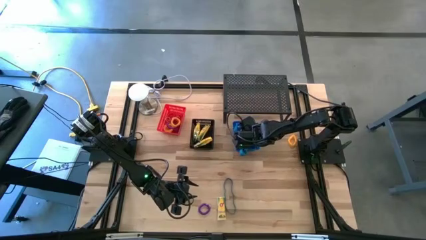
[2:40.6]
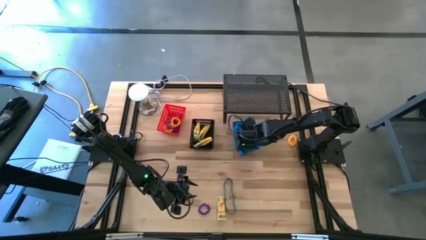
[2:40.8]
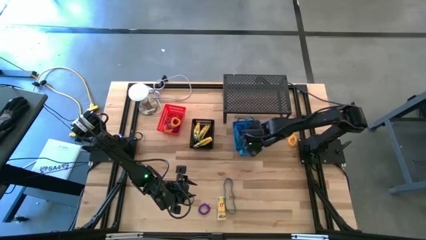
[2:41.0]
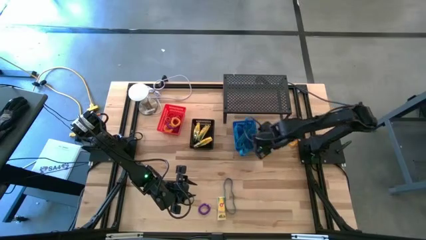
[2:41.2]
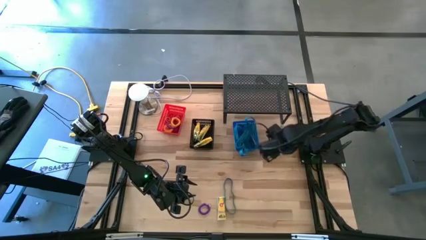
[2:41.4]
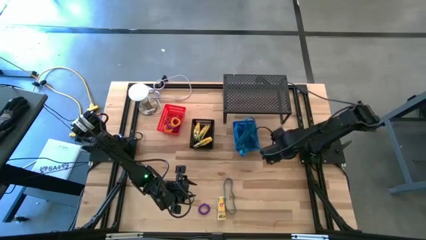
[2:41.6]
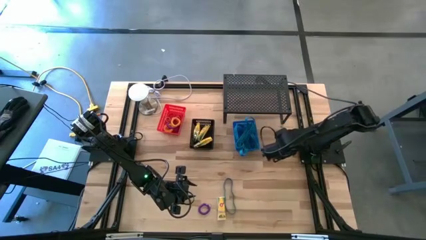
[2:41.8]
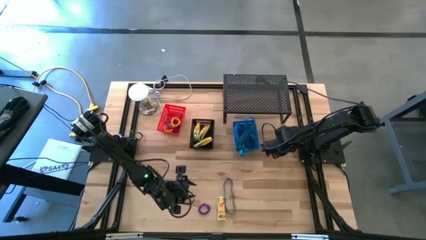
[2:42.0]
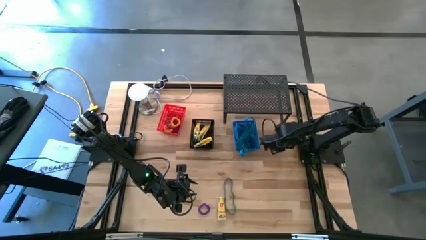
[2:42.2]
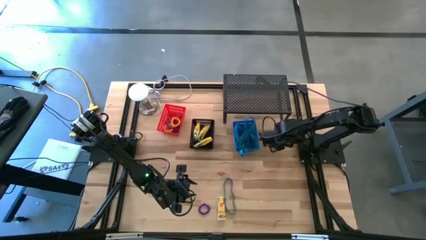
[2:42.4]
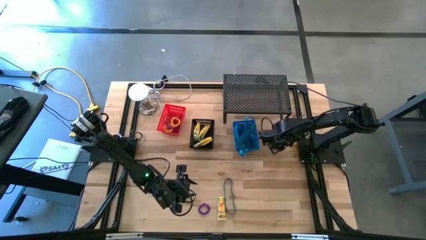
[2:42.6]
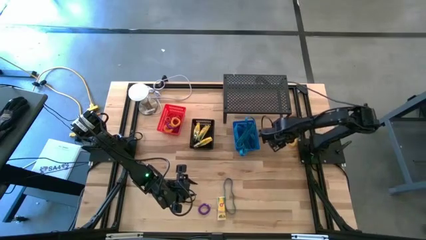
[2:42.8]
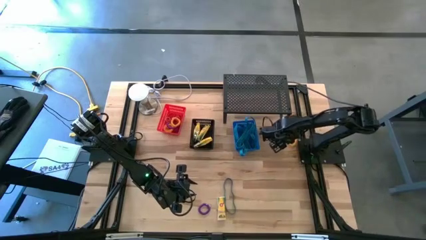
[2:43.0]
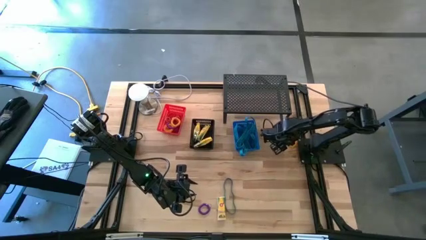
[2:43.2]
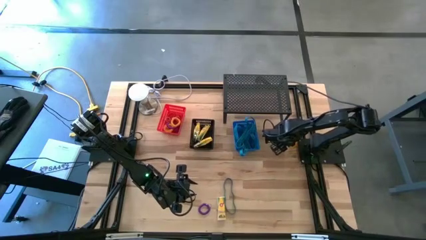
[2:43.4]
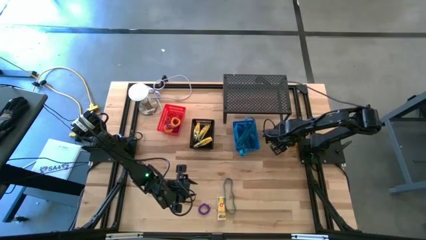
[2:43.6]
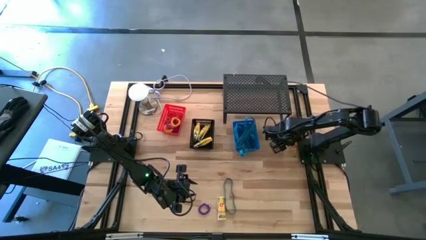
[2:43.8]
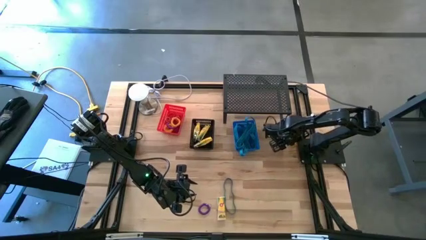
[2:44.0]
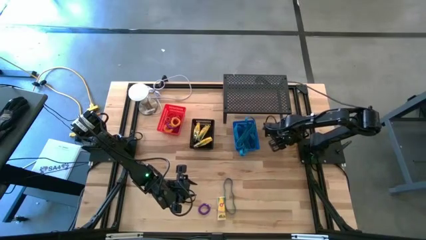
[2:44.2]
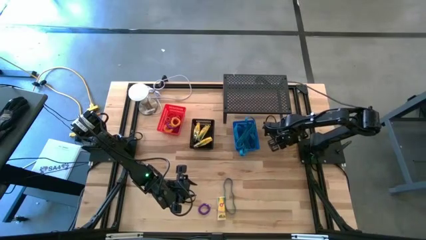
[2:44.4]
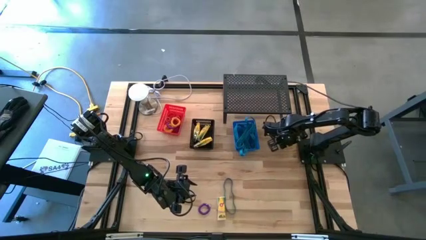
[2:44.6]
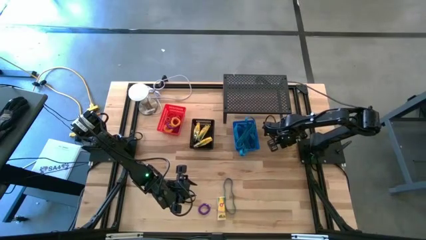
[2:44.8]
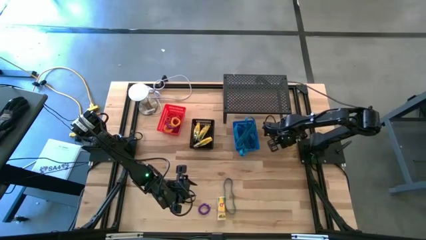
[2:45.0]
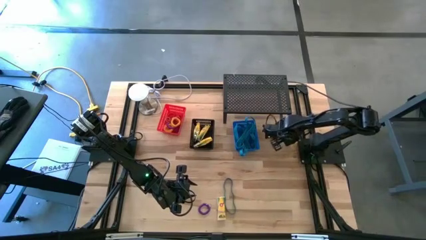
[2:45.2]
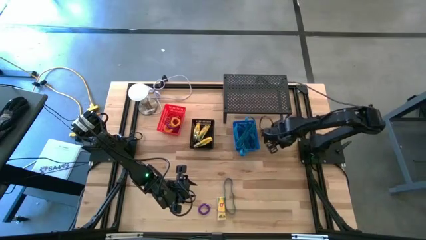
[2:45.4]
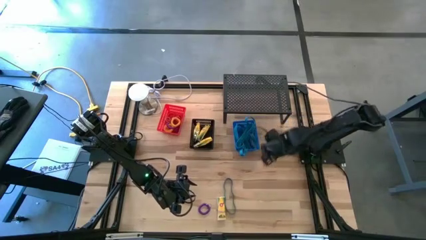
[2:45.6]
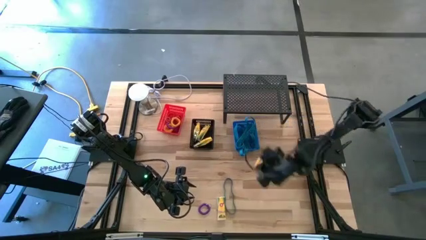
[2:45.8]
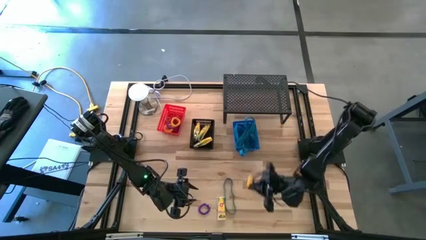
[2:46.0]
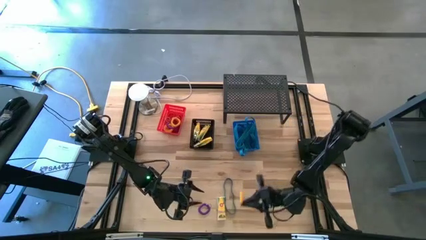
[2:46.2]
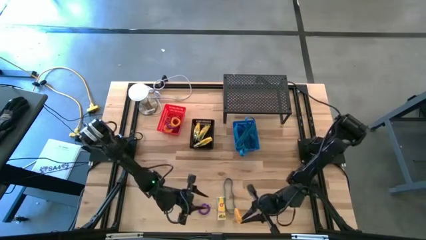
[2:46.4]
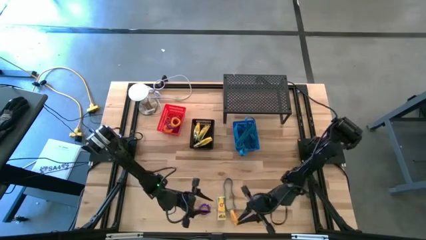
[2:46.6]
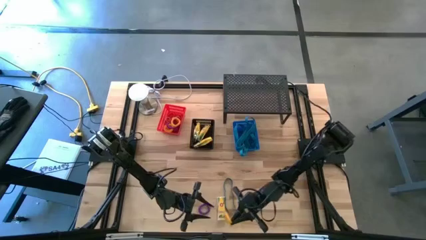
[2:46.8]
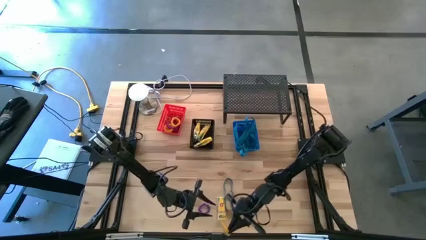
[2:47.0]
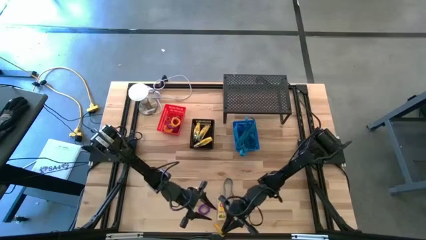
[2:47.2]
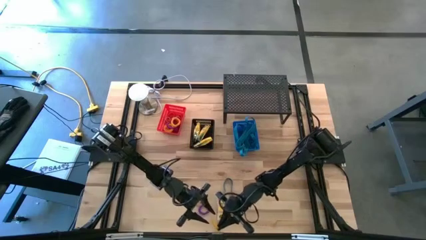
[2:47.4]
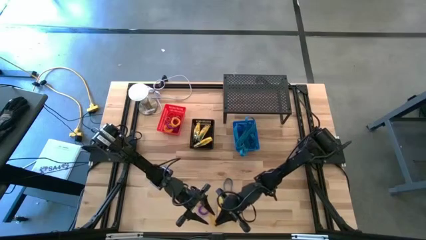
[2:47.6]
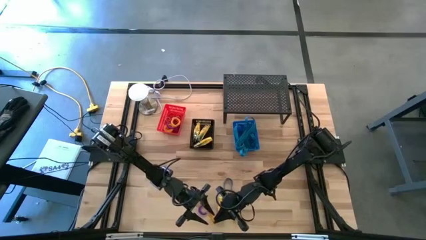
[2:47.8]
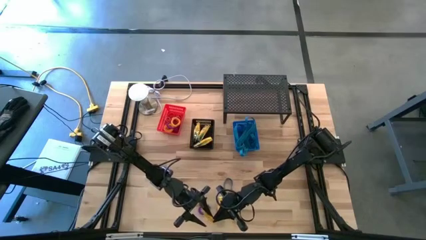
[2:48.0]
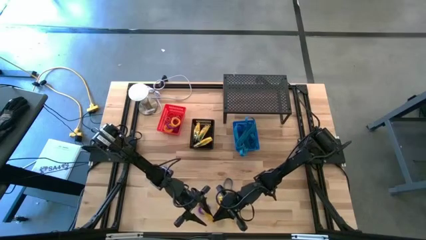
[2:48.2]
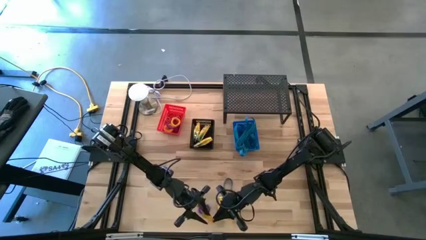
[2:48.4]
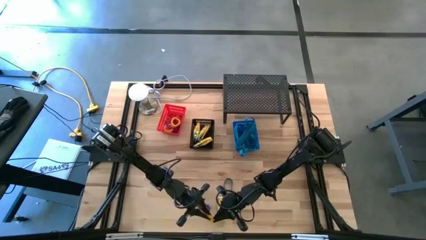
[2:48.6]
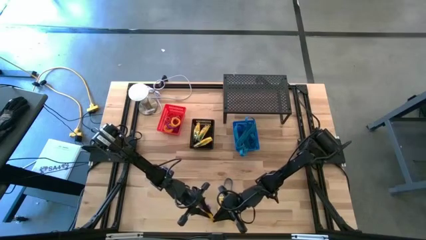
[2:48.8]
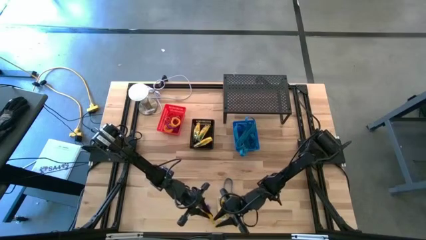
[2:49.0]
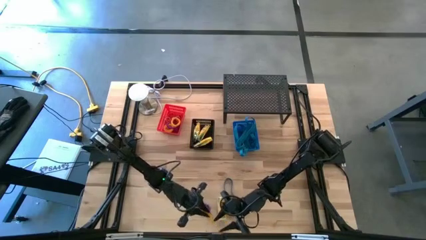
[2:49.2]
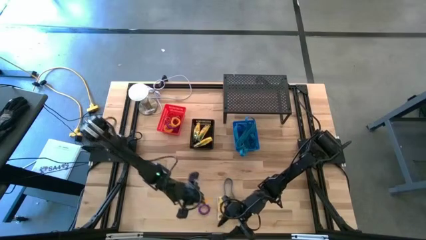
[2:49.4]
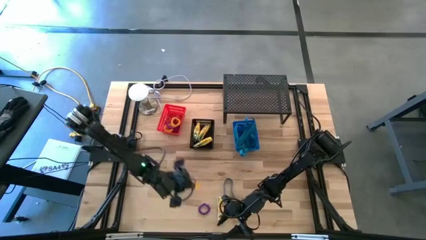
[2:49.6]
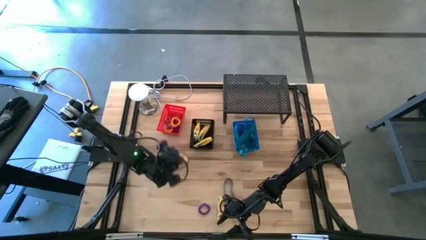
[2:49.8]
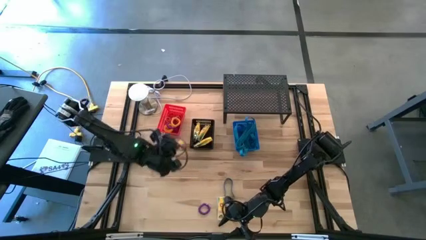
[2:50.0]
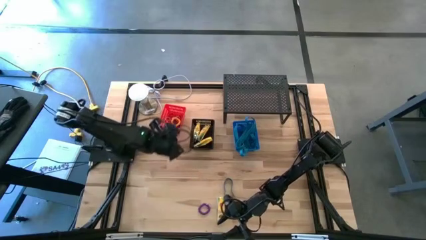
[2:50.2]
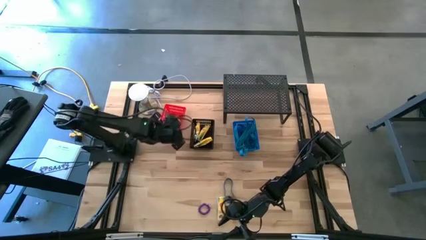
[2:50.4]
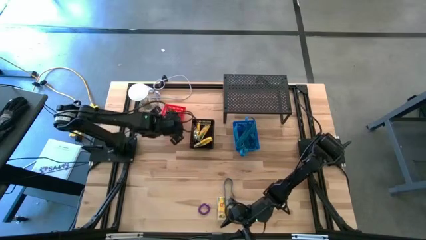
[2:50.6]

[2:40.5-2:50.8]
Task: Pick & Place Office Desk Supplies
Put the yellow wrist coil keychain into the orange bin

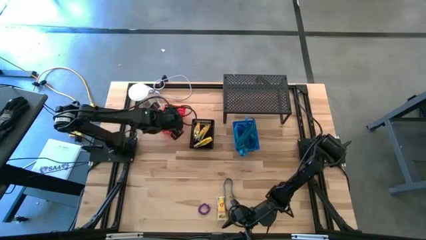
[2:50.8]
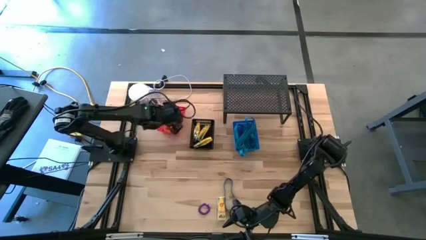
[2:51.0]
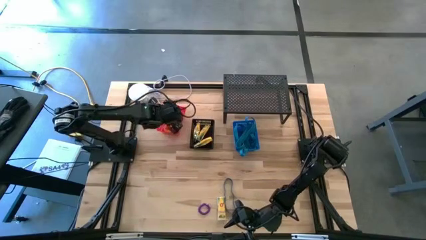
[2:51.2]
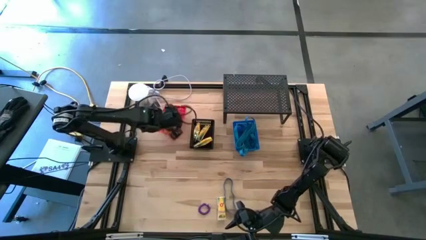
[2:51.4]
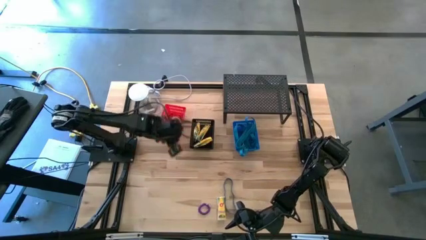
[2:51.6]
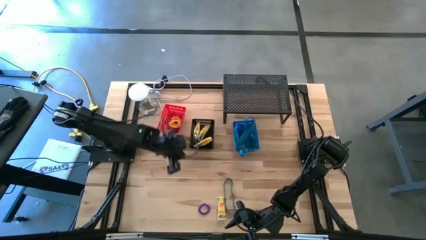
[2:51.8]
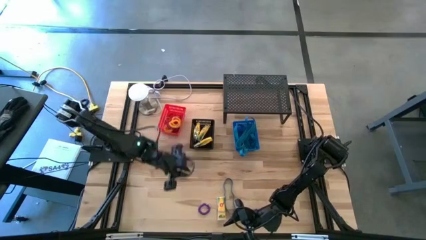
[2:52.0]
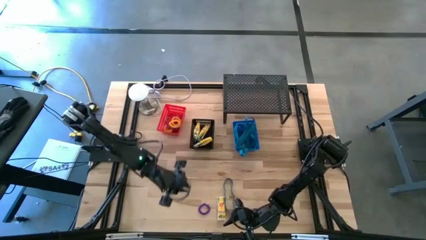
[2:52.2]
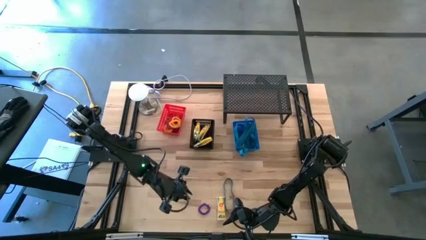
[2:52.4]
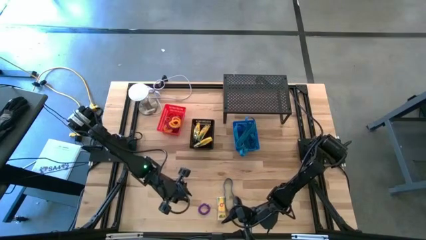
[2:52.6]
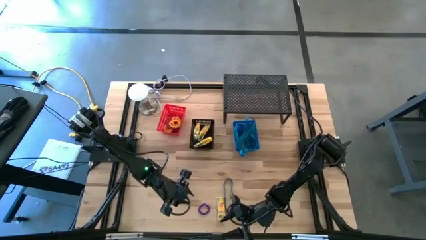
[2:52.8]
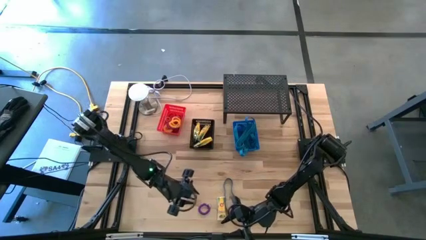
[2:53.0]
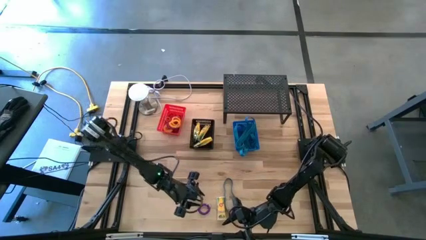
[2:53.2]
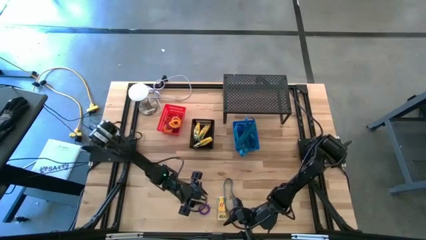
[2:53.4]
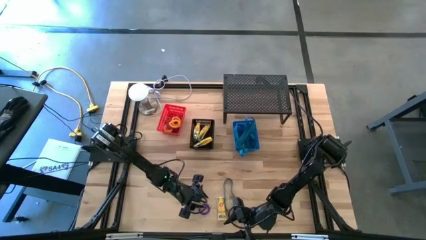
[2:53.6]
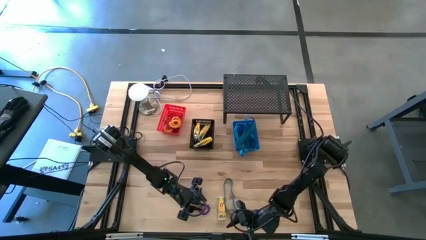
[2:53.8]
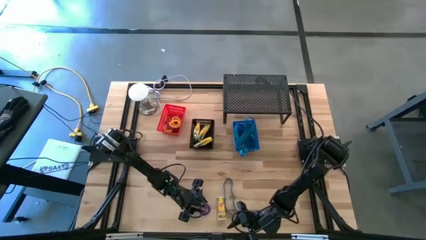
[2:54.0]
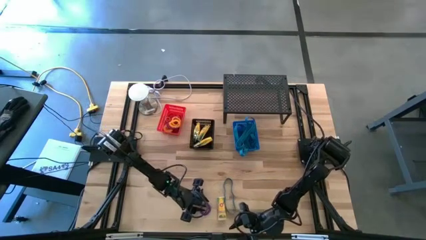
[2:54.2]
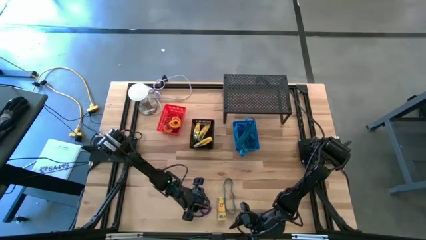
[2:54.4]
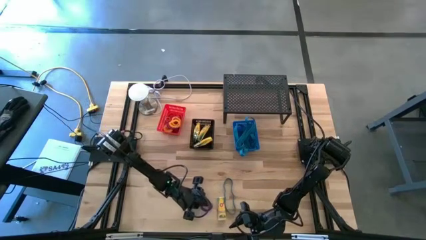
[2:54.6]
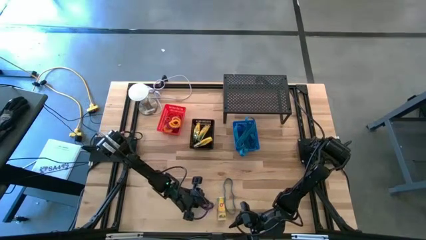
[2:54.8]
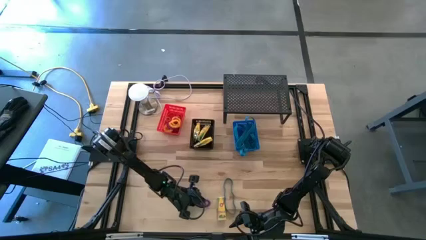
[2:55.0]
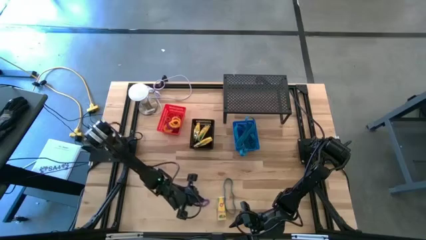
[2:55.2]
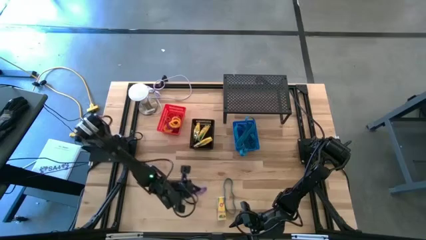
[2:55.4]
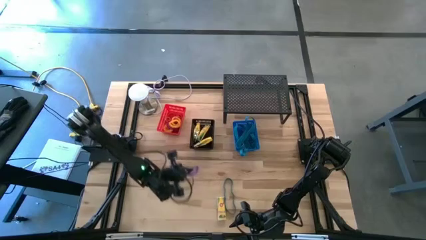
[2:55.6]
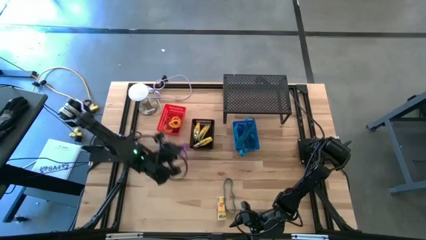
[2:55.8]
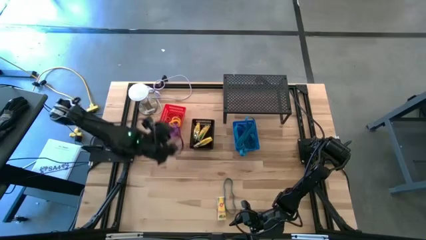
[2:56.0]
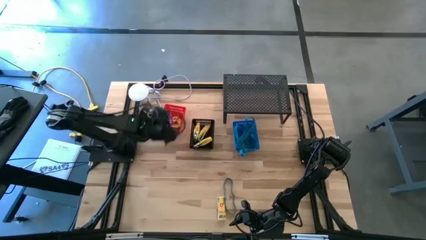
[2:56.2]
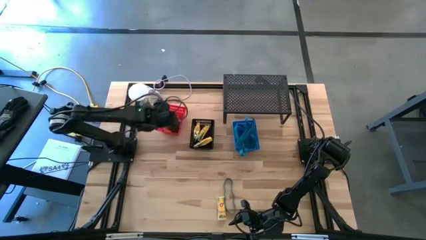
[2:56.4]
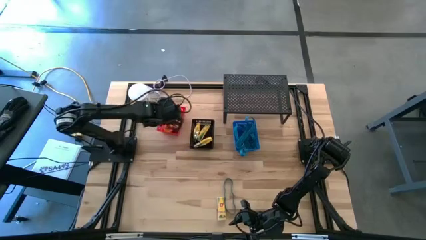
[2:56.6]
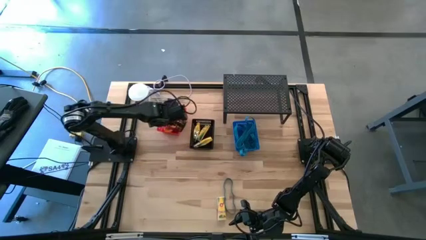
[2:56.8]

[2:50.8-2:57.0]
Put the purple wrist coil keychain into the orange bin
